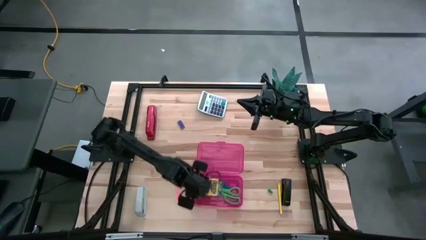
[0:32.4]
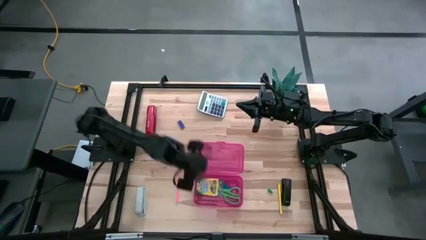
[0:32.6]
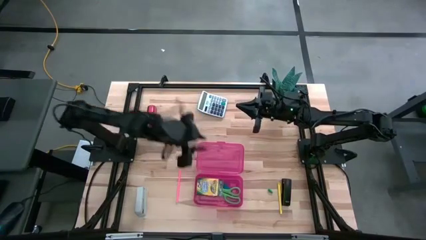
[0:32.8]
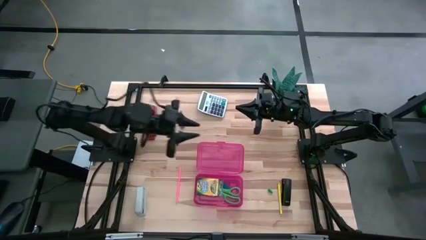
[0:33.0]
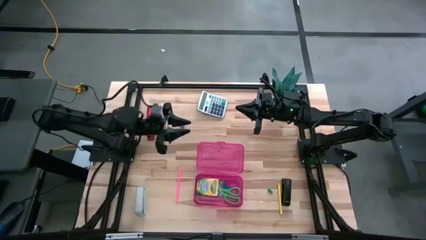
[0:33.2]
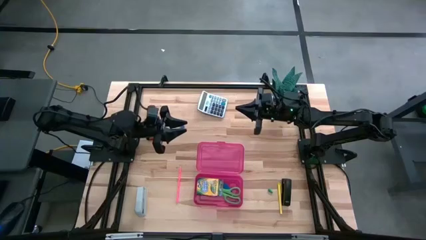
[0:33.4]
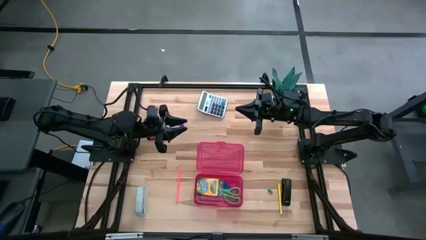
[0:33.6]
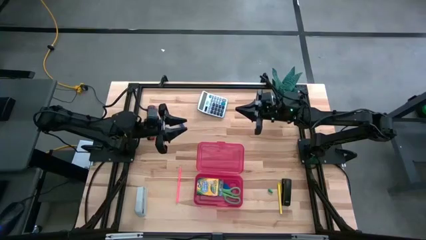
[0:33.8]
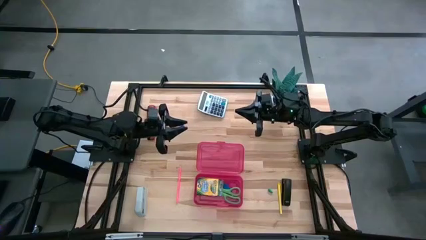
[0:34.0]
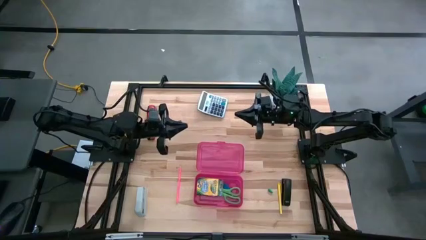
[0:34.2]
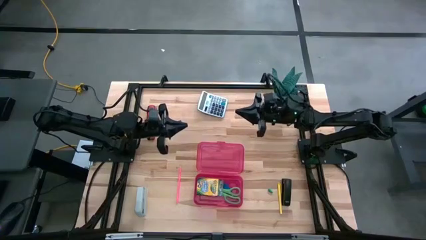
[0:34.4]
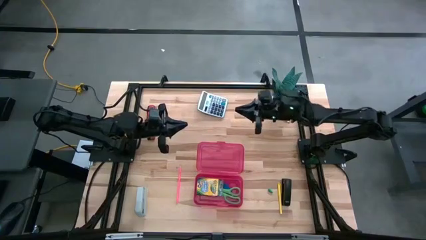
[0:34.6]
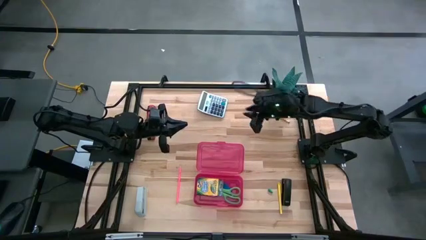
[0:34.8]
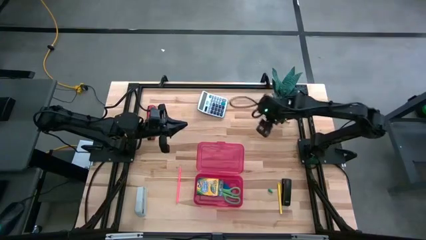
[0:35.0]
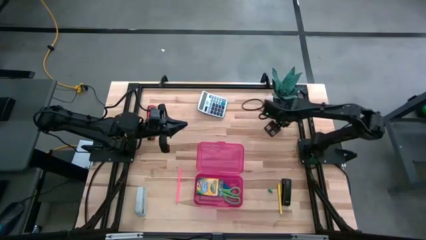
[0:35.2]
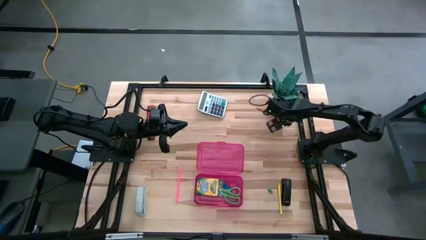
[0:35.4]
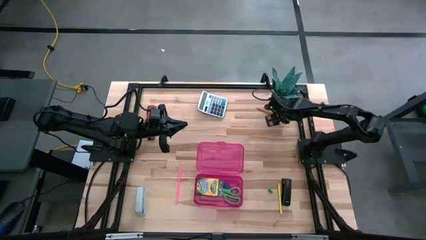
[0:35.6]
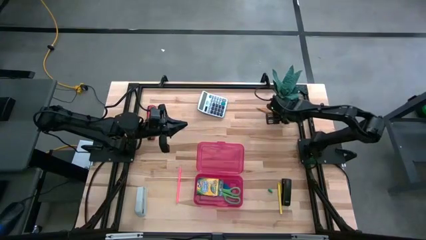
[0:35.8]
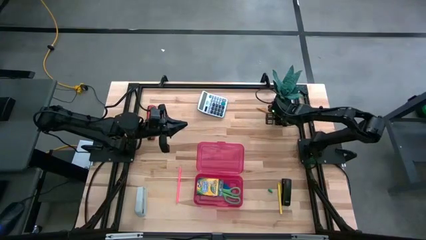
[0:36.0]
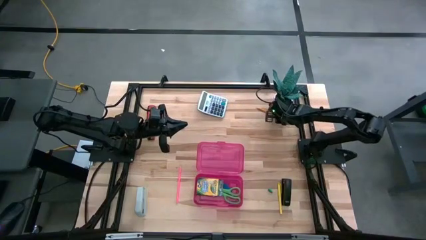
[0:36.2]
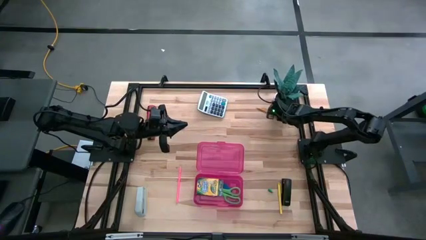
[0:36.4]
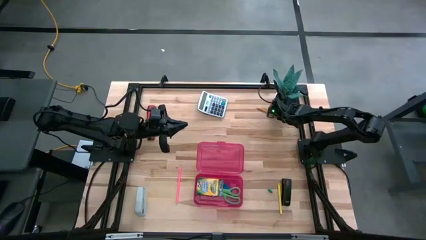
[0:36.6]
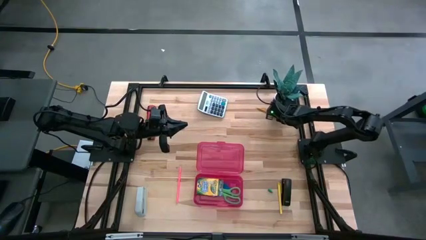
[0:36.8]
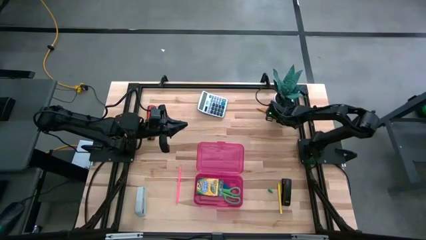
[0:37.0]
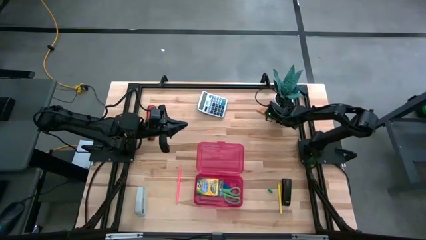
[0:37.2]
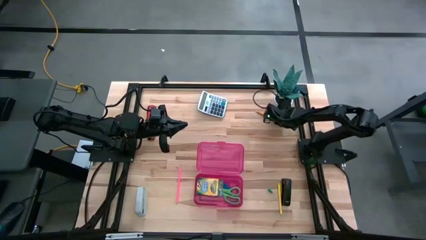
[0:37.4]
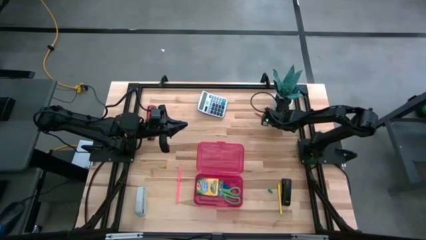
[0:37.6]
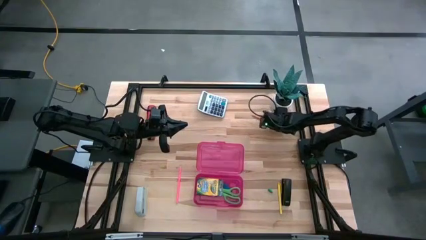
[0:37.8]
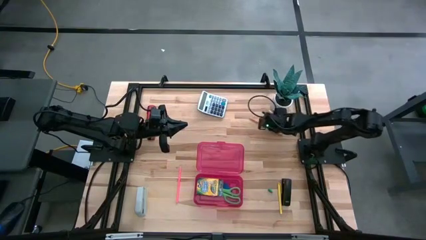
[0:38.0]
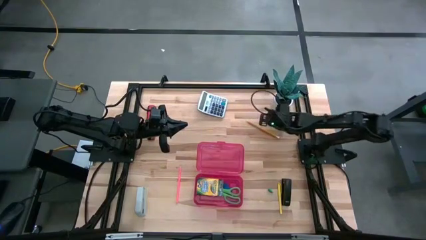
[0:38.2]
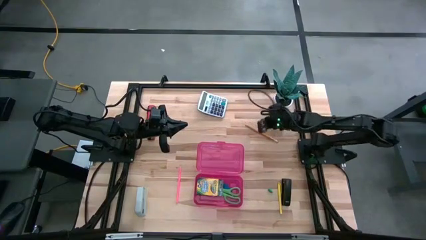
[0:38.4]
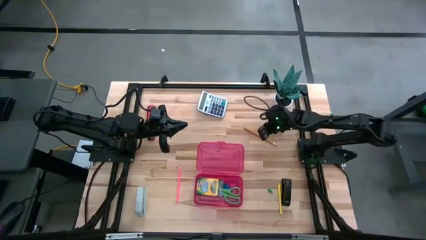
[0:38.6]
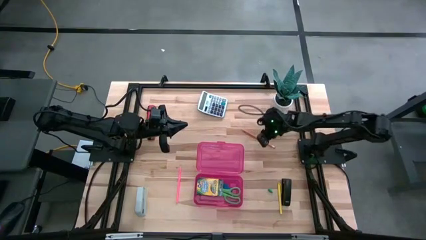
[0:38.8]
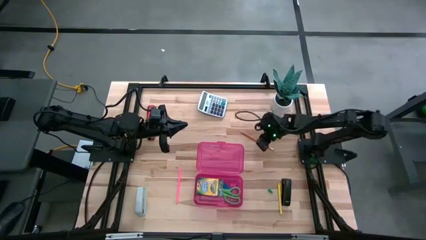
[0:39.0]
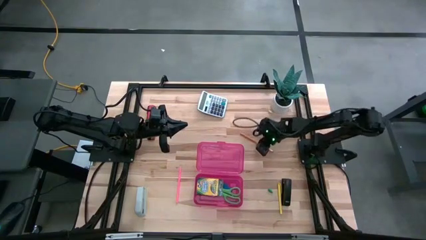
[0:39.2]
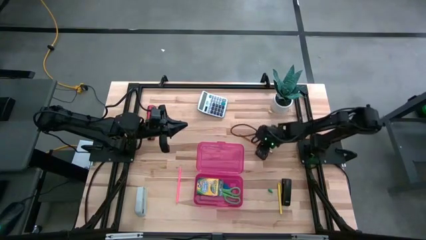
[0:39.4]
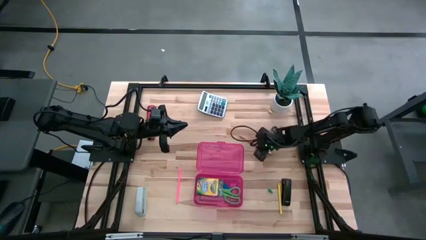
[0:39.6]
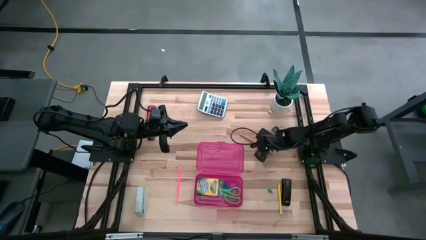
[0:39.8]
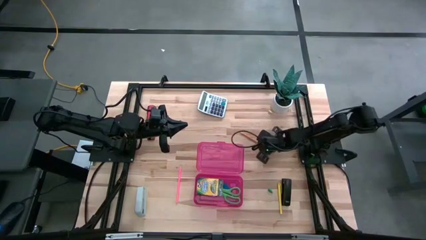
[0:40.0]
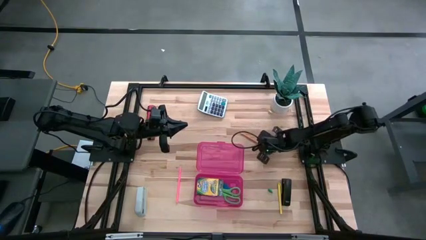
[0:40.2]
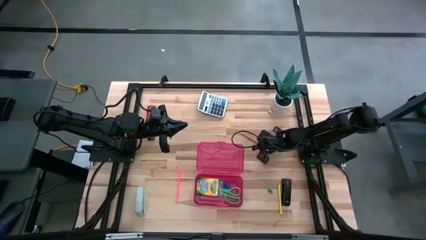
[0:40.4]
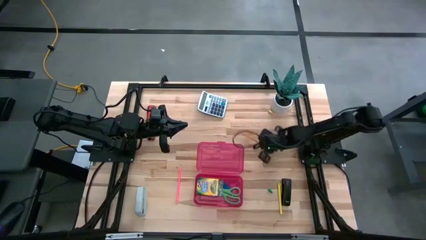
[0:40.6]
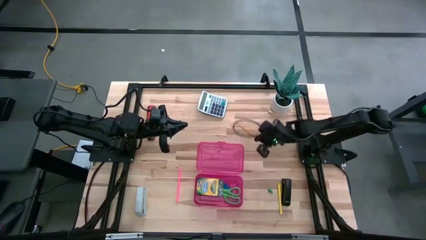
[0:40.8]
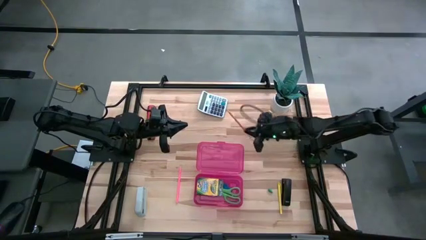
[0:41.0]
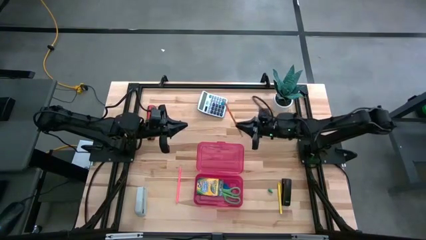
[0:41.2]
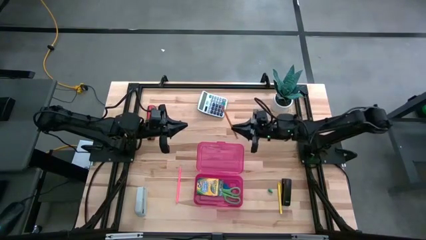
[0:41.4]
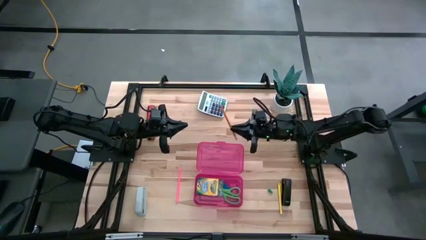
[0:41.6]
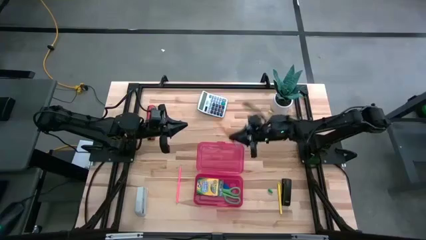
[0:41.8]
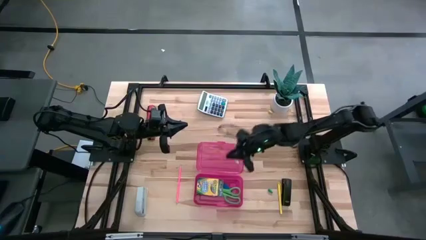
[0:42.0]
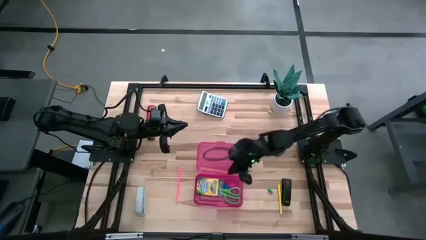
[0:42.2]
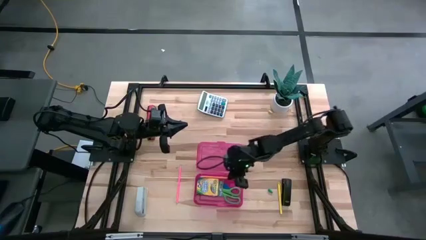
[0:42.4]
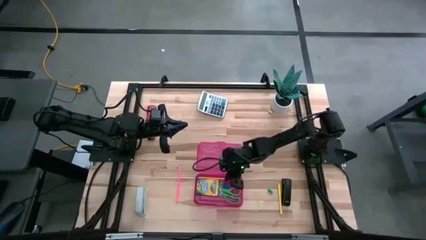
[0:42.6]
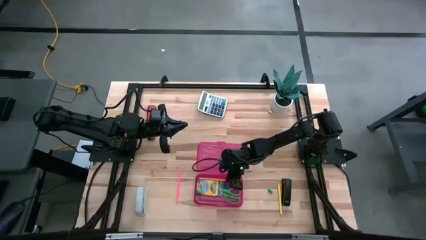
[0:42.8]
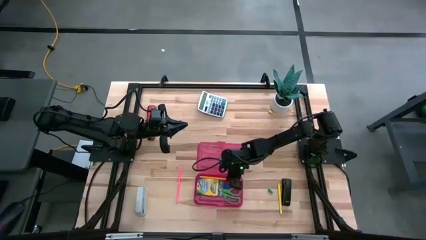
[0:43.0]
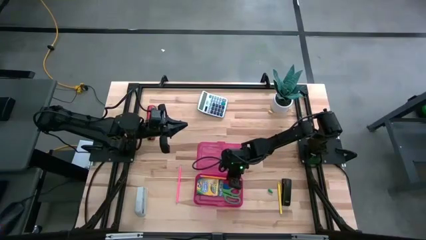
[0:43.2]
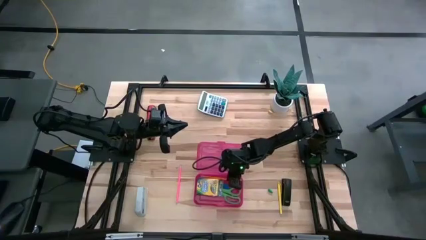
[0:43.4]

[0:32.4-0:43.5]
Task: Pack school essentials
Put the yellow pencil into the pink supply box

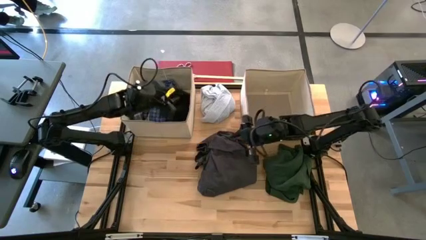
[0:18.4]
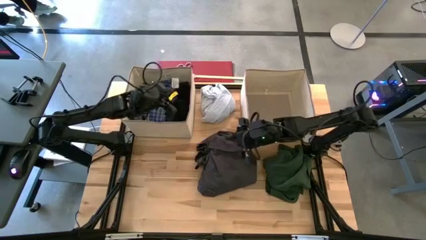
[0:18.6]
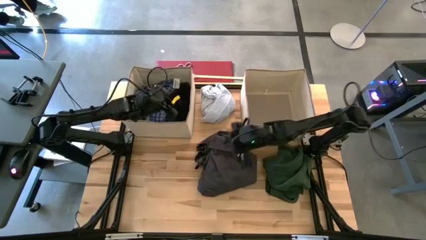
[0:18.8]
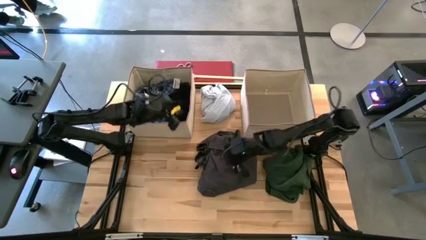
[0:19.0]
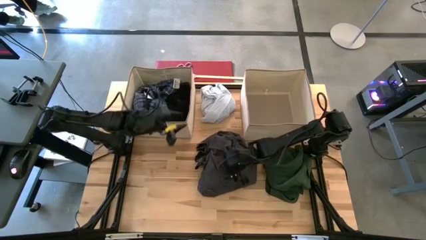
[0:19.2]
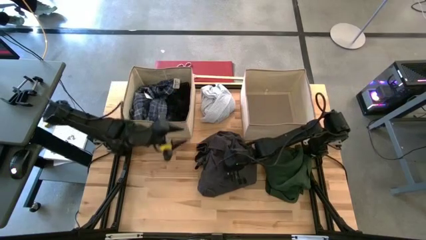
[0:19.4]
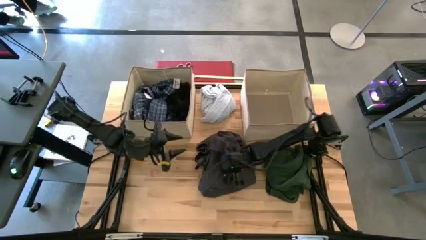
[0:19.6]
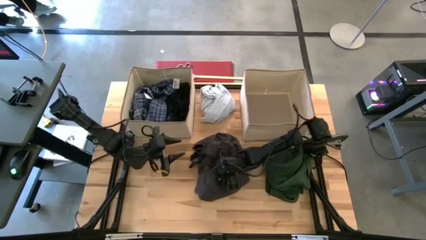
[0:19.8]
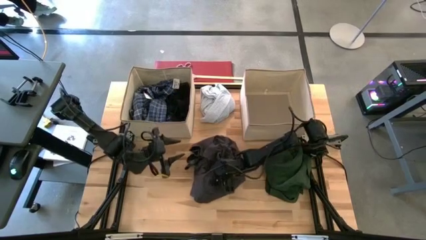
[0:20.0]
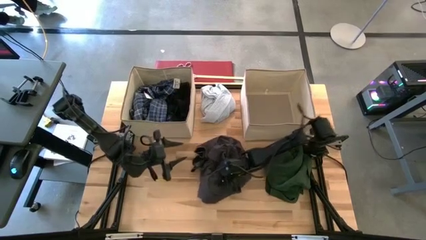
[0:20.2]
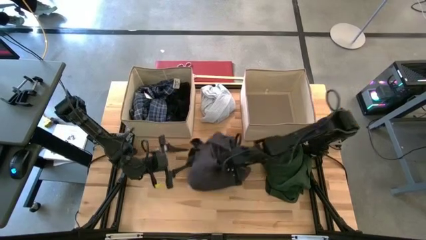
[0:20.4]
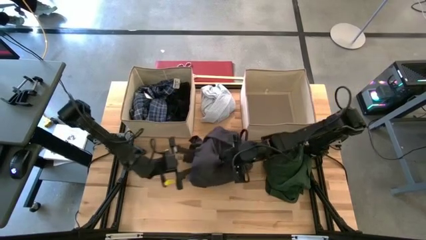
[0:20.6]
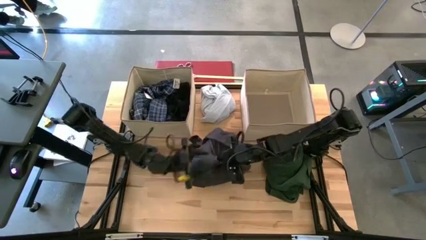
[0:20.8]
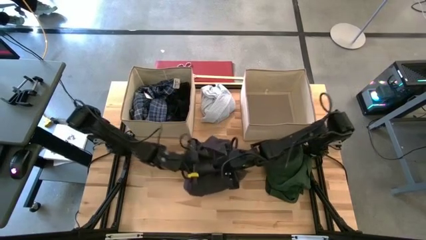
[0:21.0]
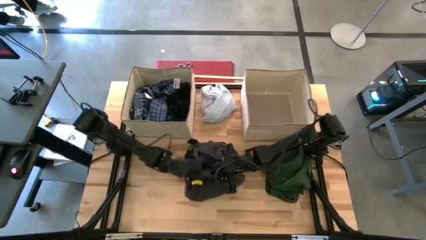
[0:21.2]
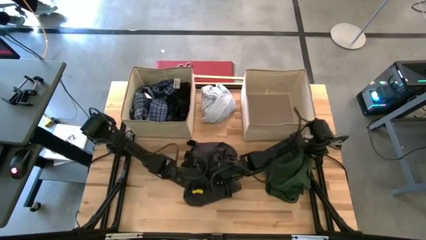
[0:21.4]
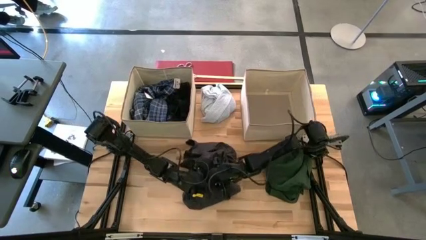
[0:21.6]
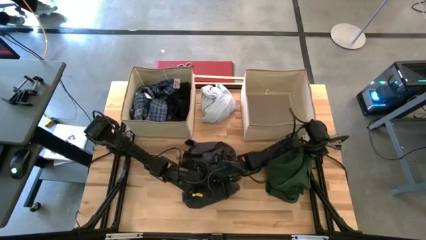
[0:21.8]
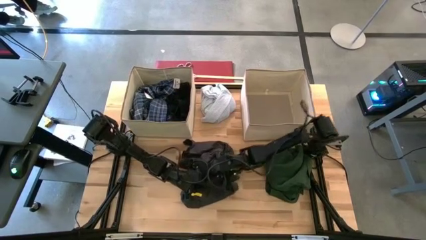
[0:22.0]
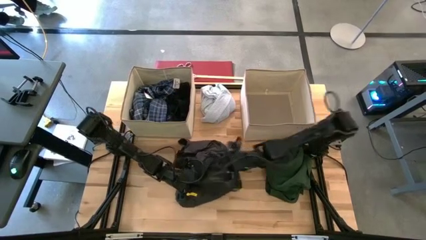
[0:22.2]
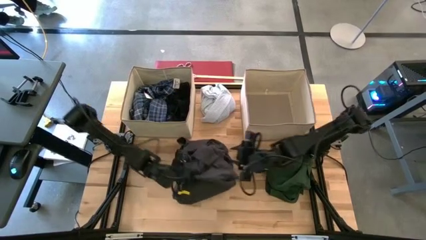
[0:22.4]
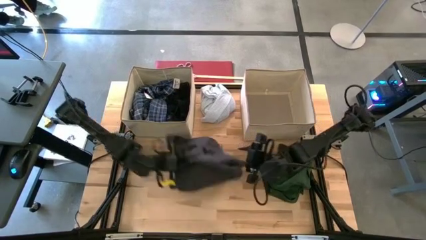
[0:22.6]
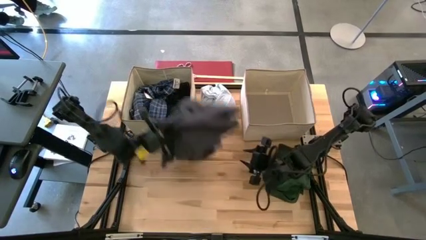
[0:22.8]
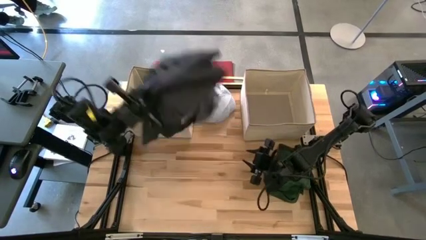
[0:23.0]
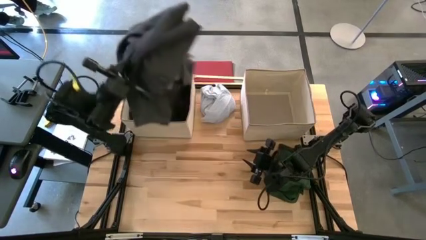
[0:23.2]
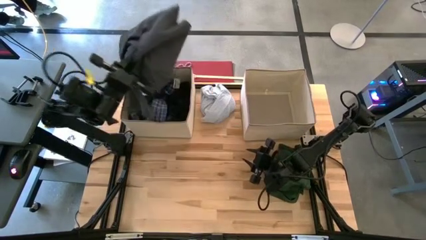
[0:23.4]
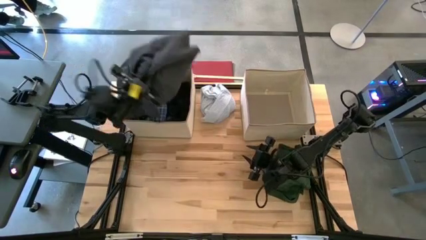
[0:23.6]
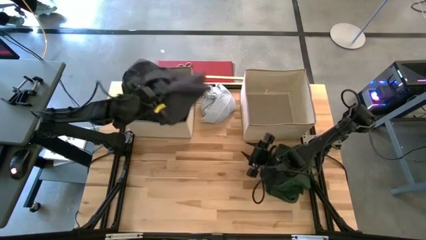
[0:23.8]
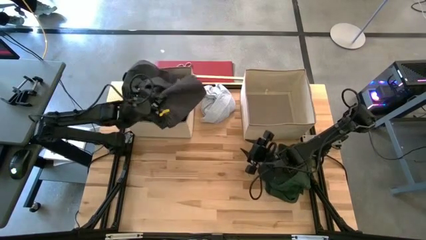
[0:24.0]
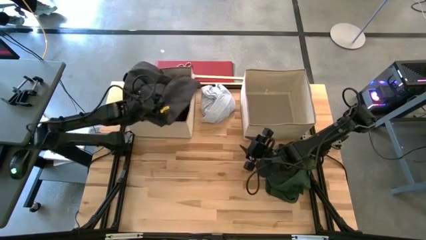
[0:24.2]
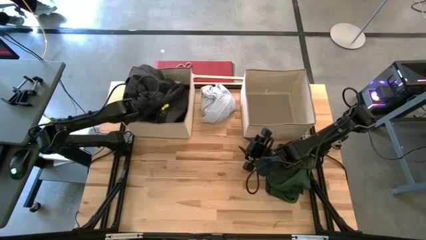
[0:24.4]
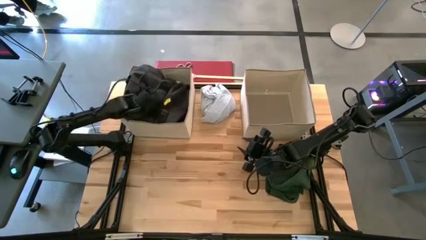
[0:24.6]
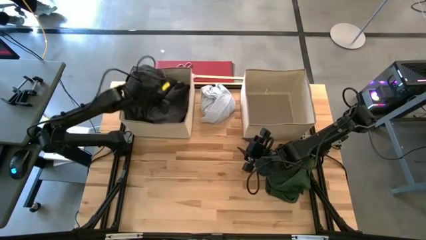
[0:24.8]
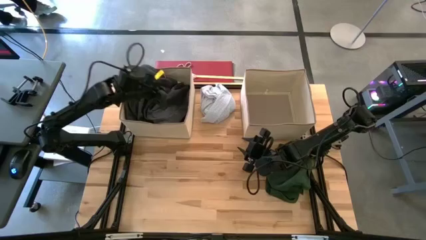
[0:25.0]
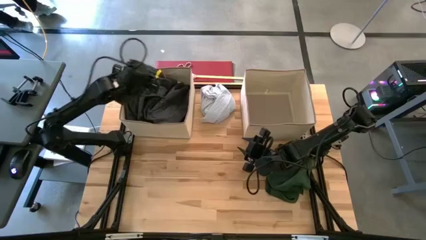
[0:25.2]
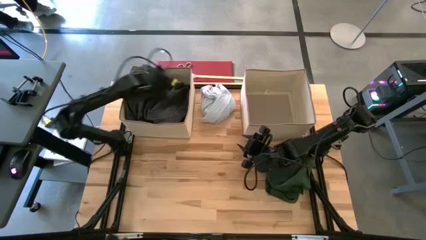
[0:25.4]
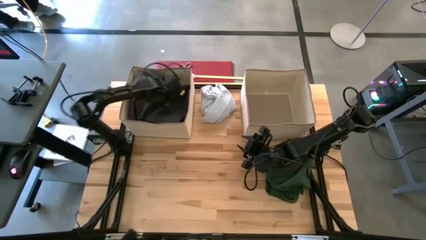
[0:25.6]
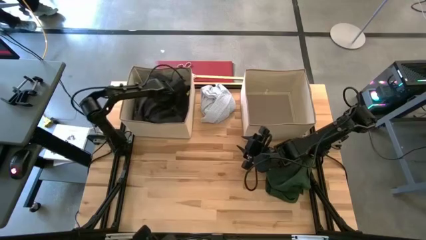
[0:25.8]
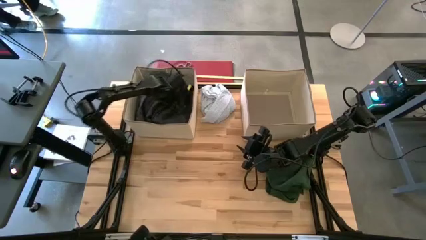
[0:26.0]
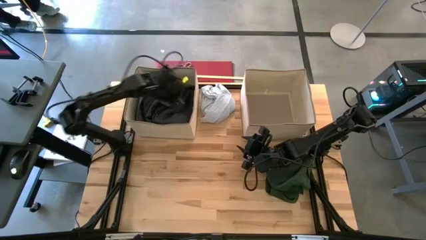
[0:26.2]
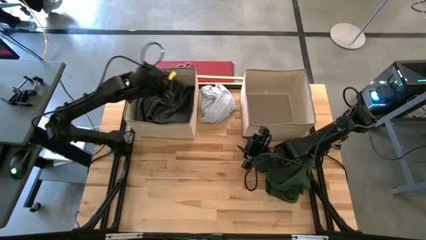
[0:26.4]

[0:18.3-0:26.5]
Task: Sort clothes
Put the grey shirt into the left laundry organizer
